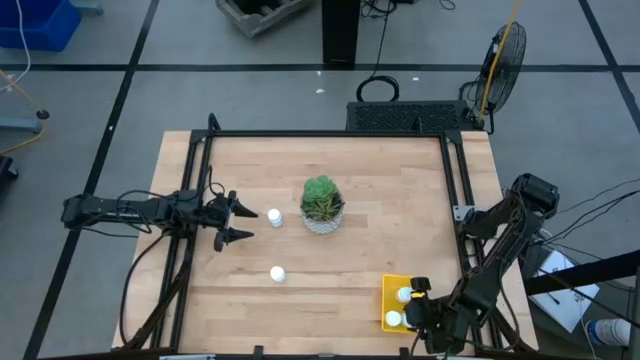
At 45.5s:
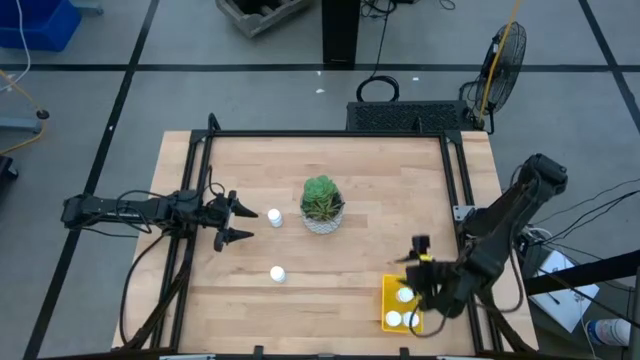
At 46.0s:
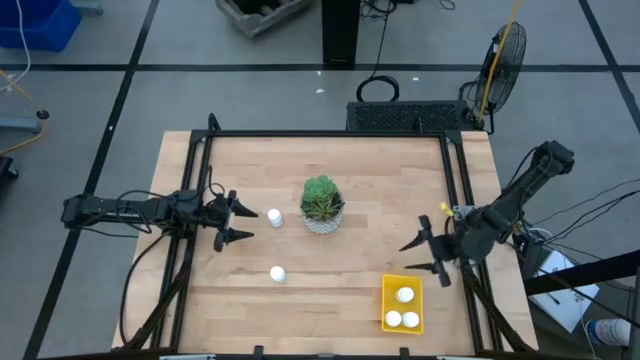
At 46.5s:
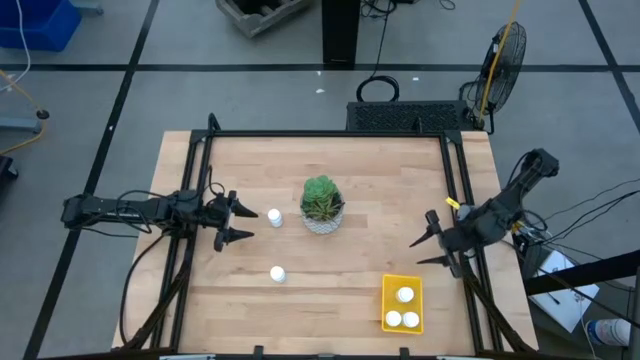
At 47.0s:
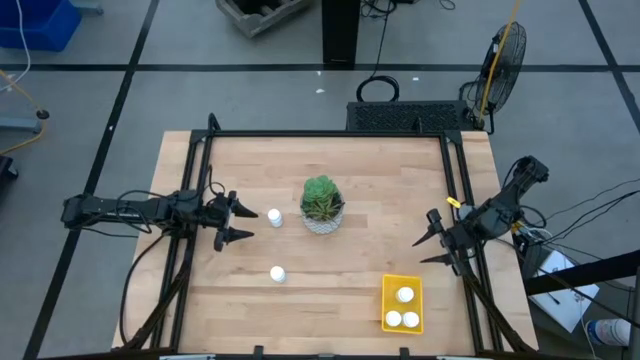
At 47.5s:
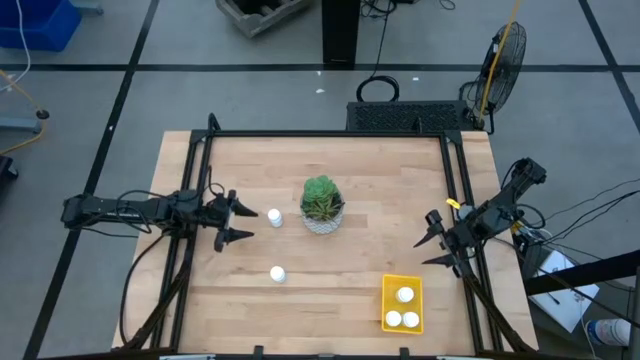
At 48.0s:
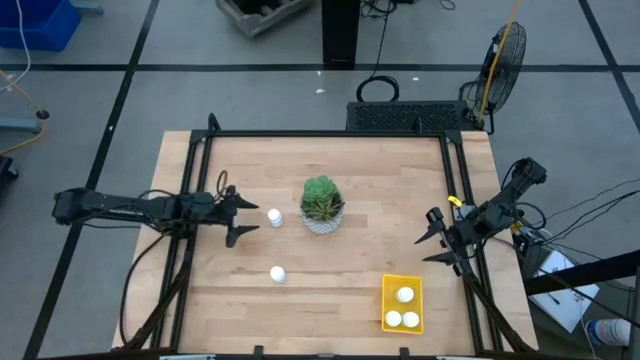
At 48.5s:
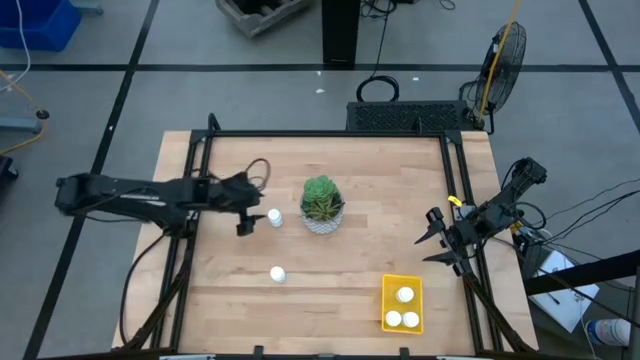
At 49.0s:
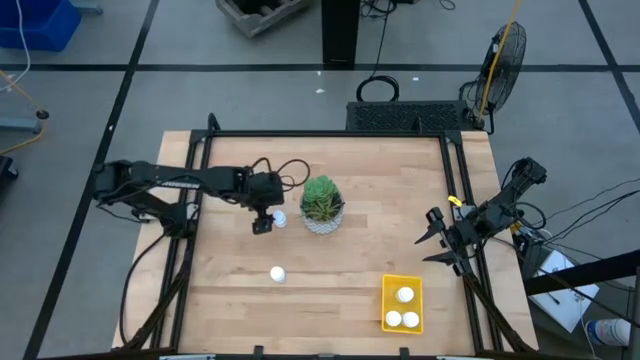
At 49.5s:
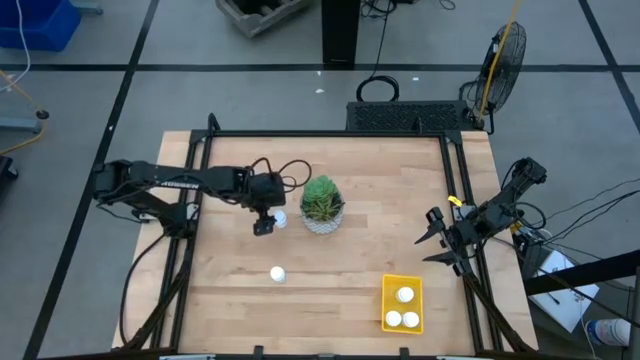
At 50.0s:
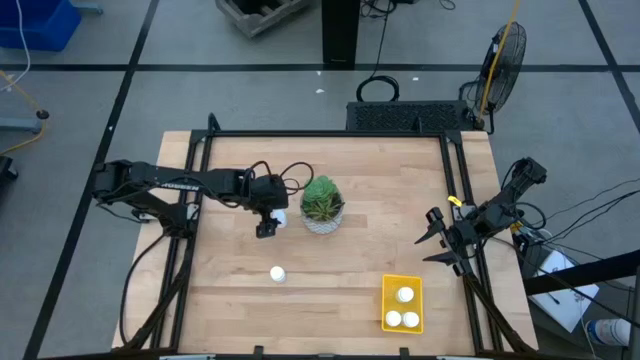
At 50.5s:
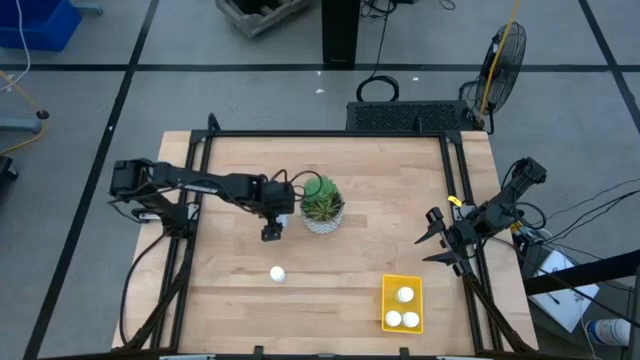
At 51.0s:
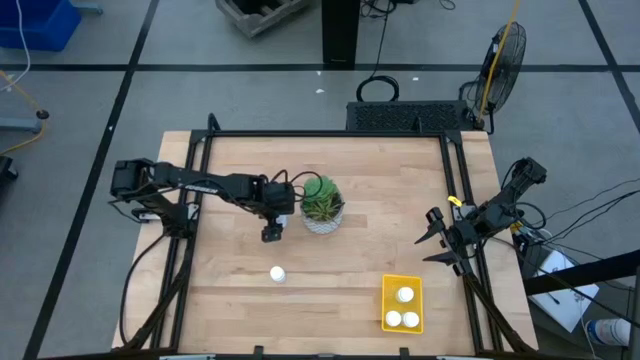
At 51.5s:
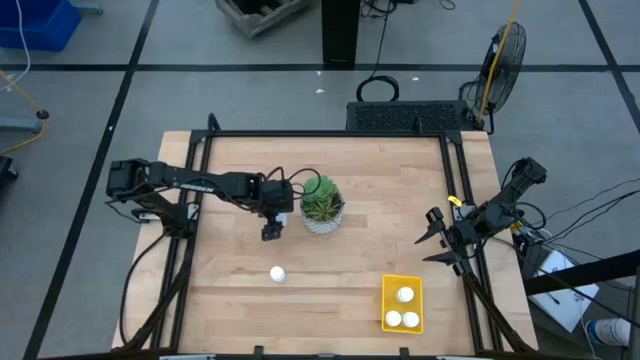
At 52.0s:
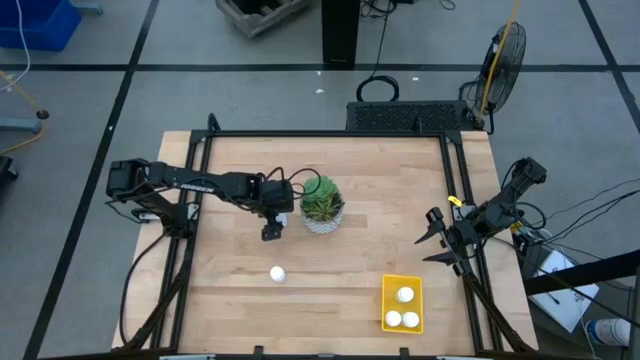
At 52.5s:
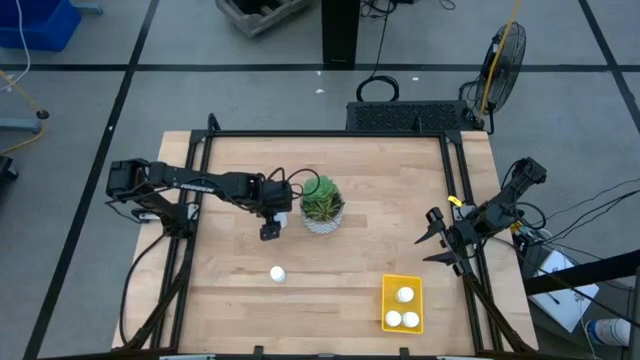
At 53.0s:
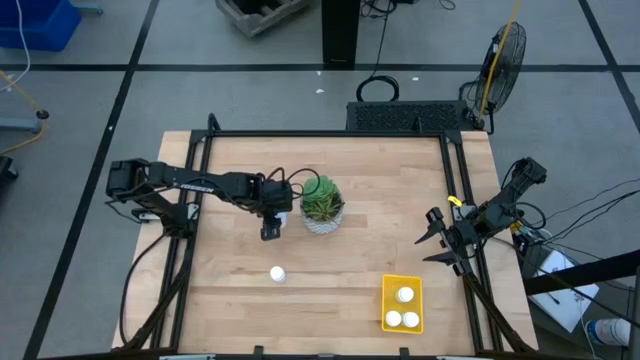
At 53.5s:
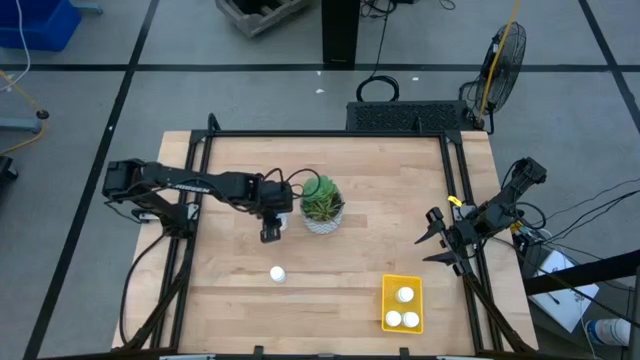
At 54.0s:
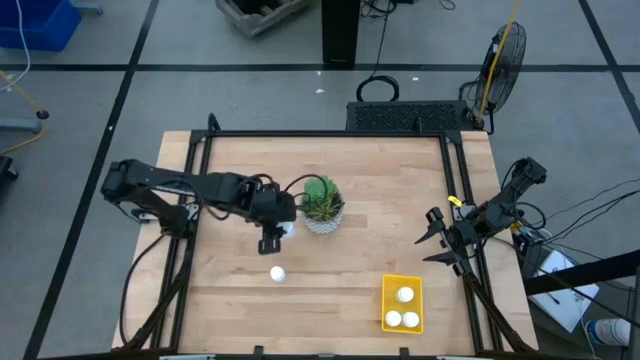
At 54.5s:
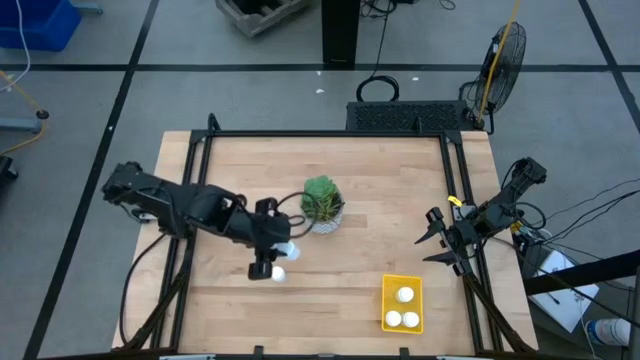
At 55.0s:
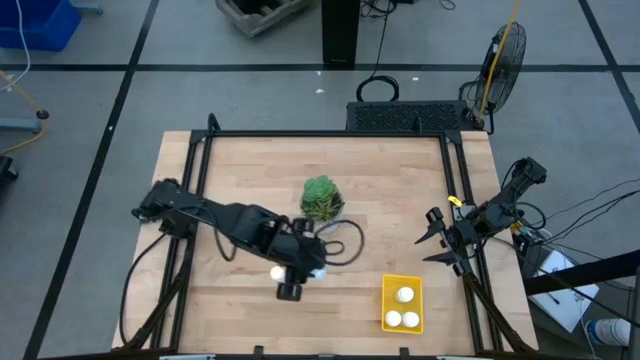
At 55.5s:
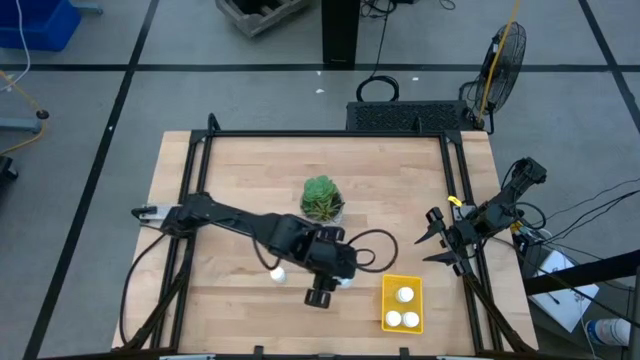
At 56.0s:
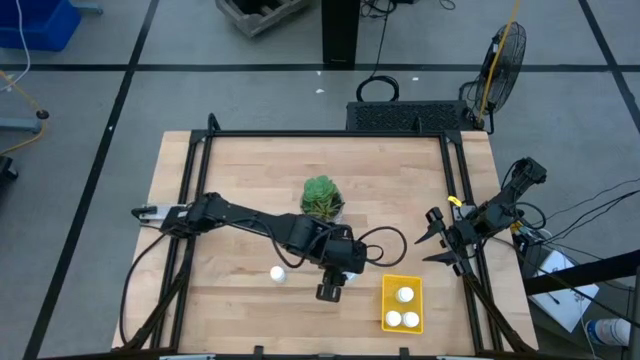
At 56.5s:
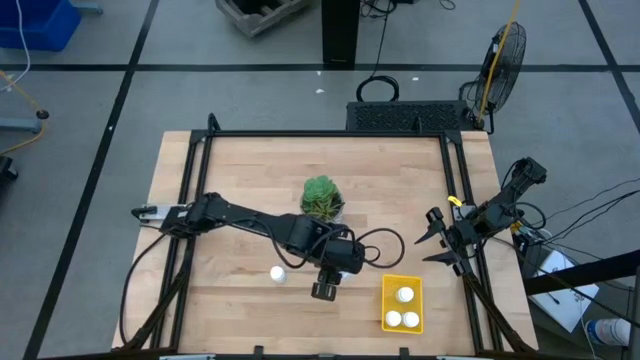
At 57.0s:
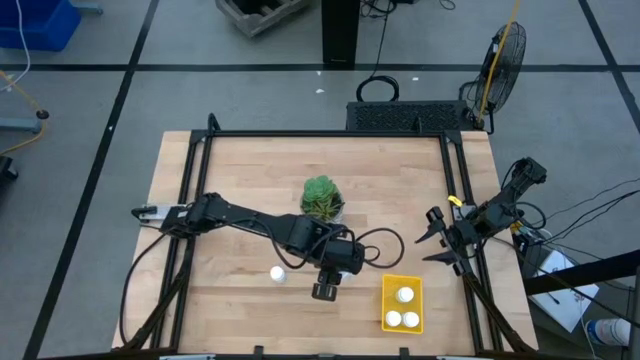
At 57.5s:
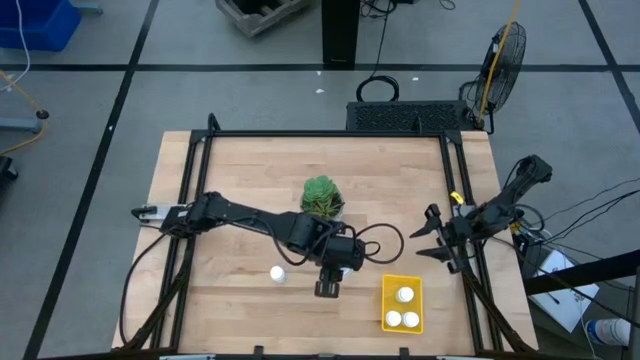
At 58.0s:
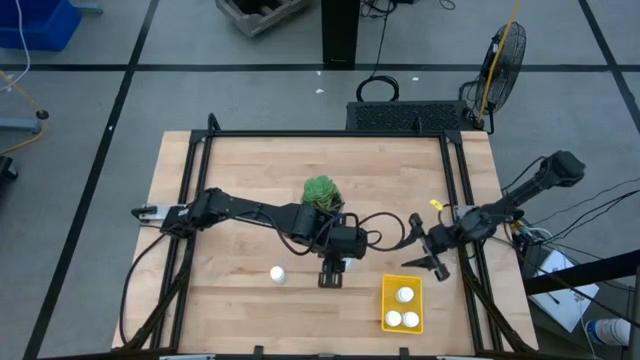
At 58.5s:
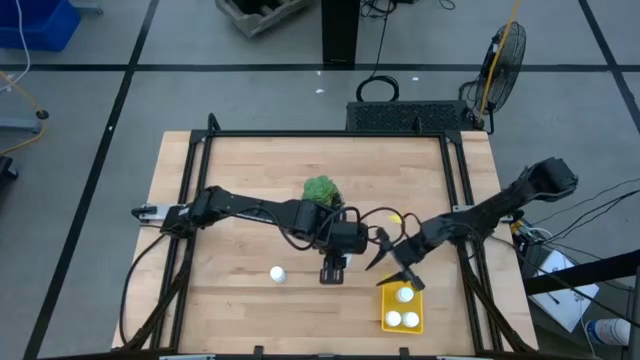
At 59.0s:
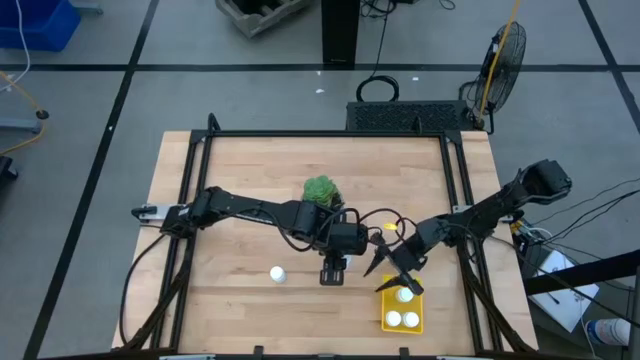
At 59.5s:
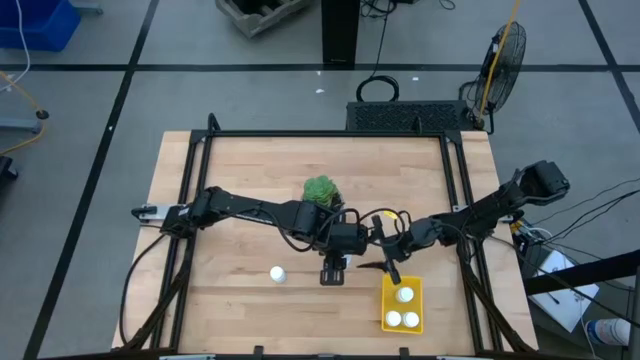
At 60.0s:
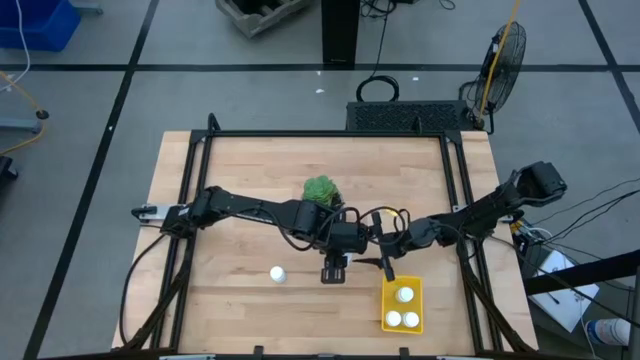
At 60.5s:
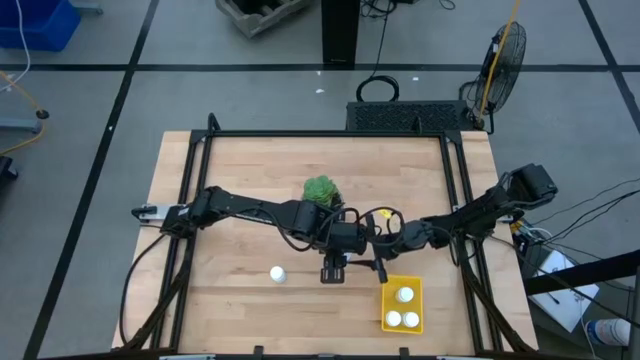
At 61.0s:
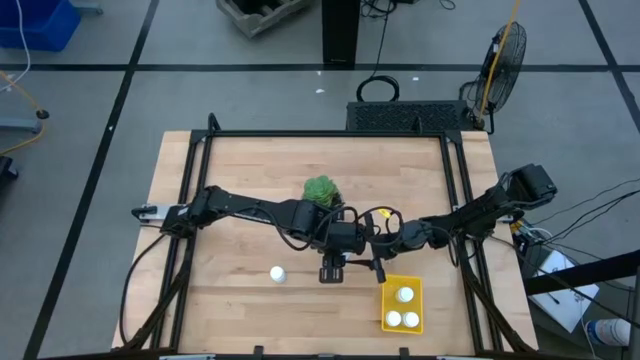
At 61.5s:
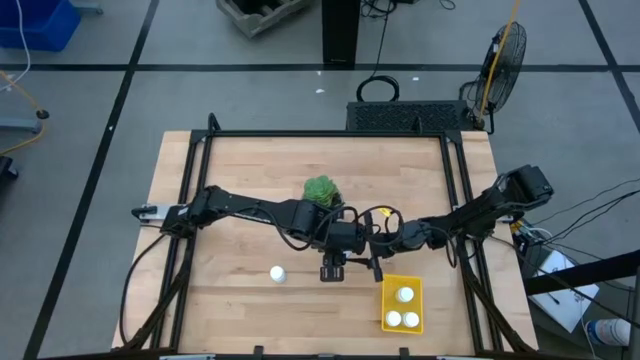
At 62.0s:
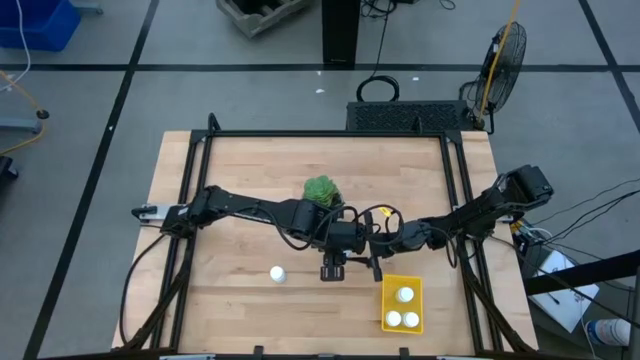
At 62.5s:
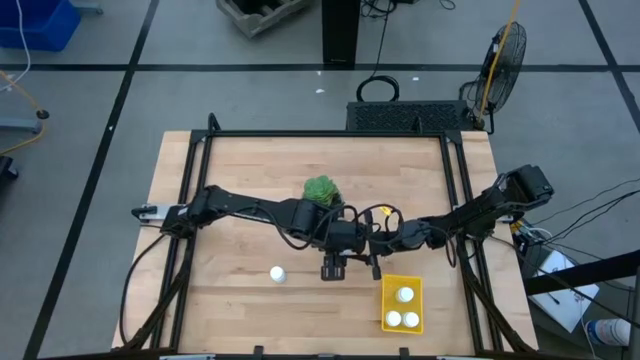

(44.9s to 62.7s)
Task: Pick and place pill bottles into a basket
Put the white pill bottle into the bin

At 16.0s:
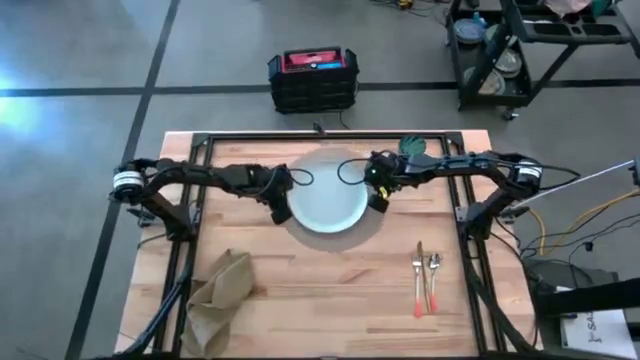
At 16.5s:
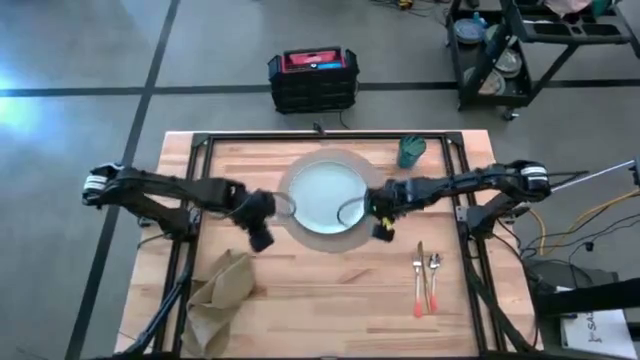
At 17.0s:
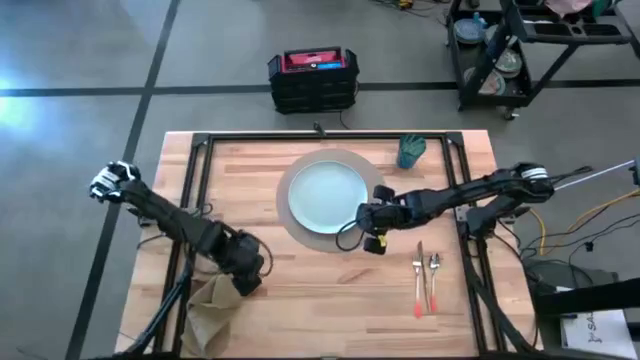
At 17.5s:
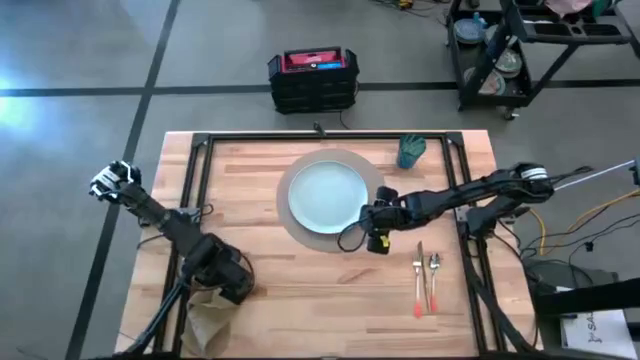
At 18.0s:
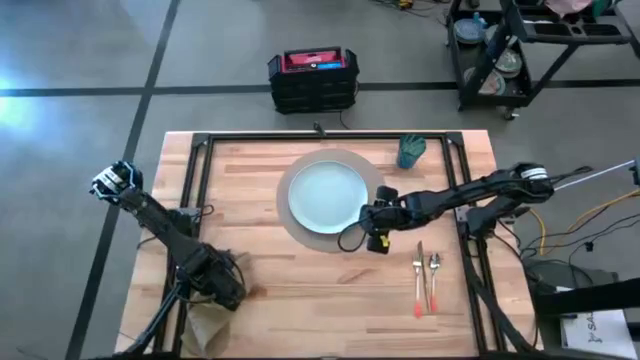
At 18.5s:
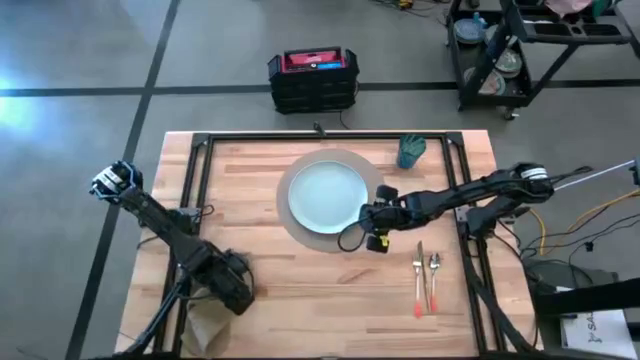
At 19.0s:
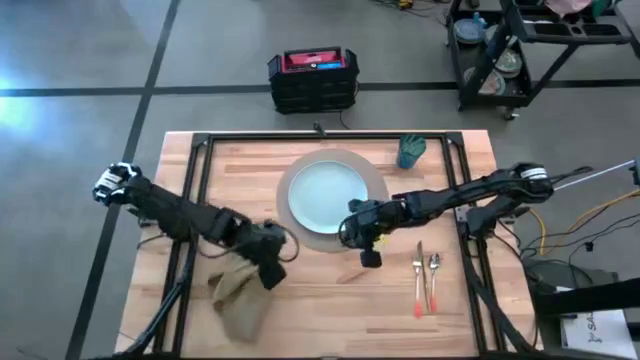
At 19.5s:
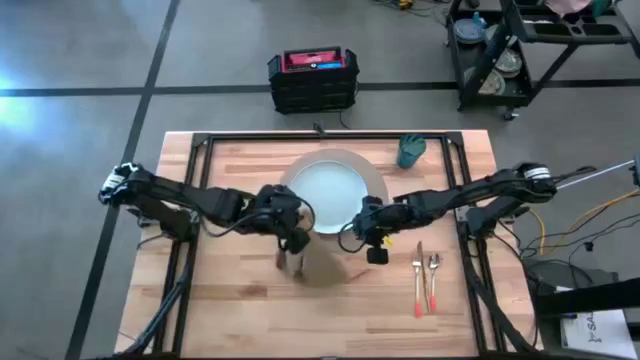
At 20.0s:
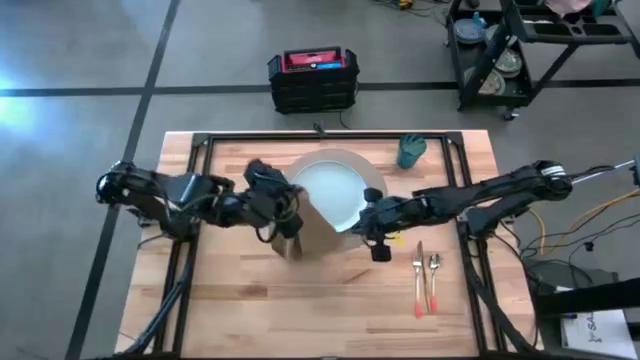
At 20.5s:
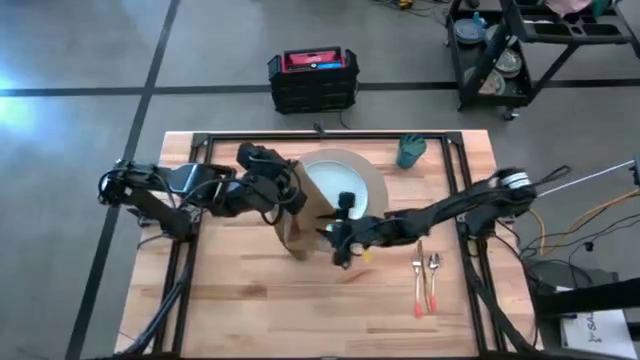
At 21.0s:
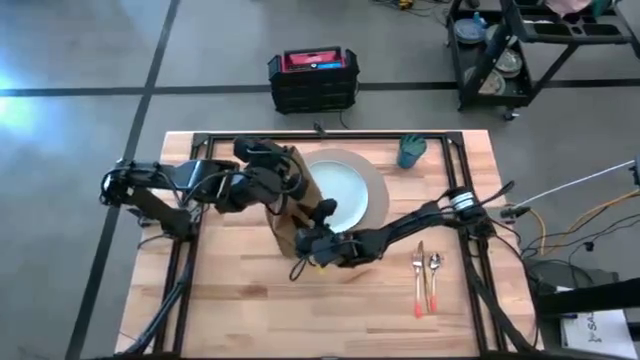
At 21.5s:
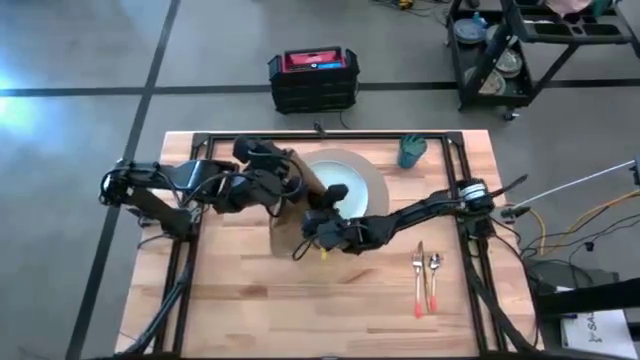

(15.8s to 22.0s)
Task: Set table place
Fold the brown table napkin
